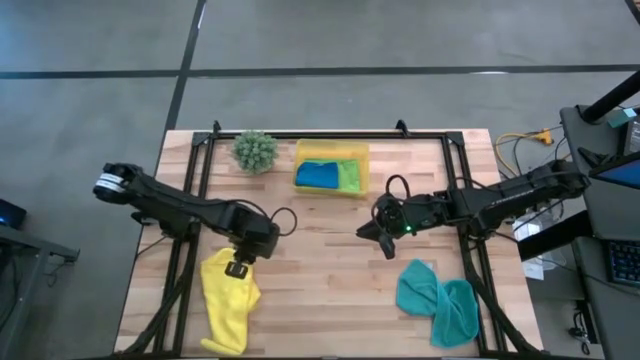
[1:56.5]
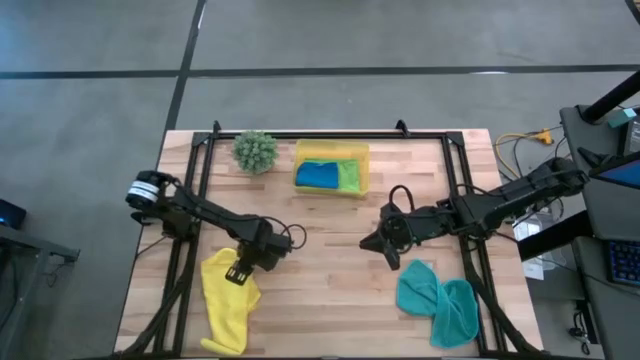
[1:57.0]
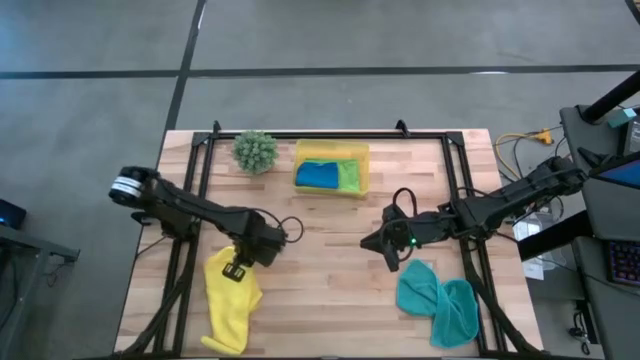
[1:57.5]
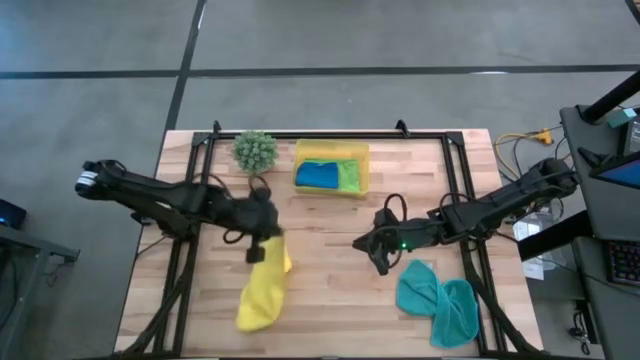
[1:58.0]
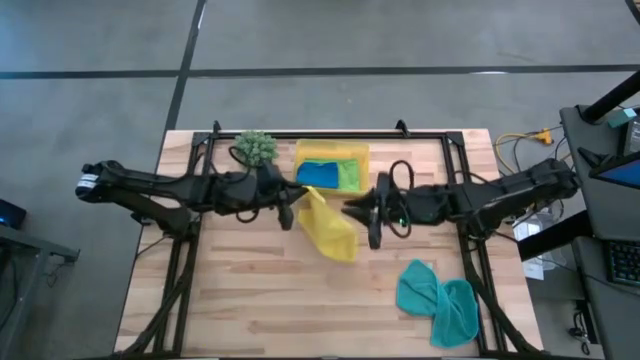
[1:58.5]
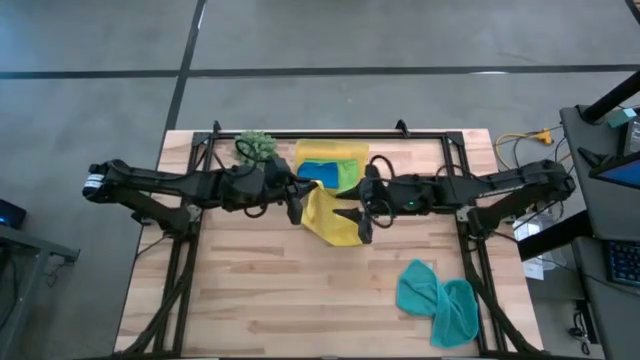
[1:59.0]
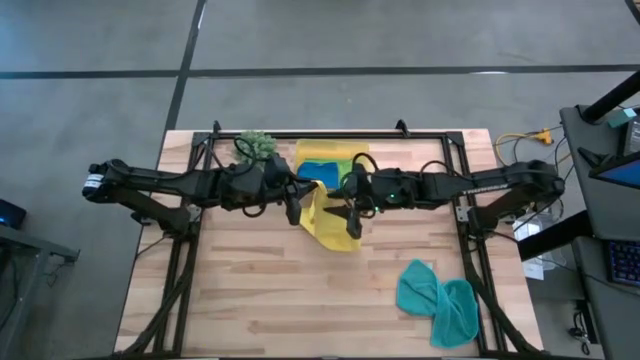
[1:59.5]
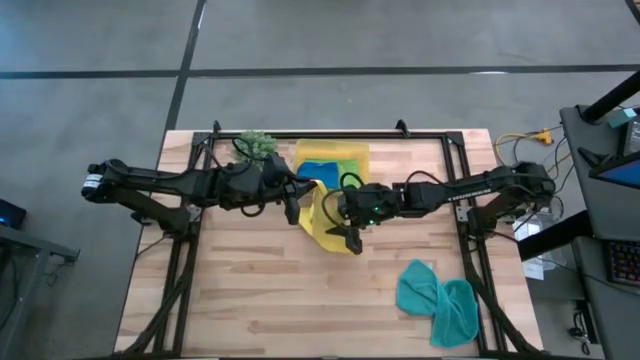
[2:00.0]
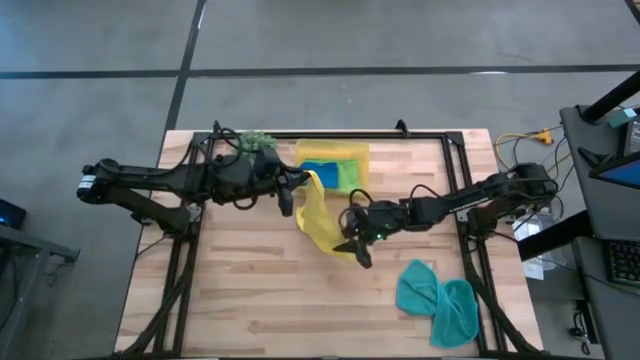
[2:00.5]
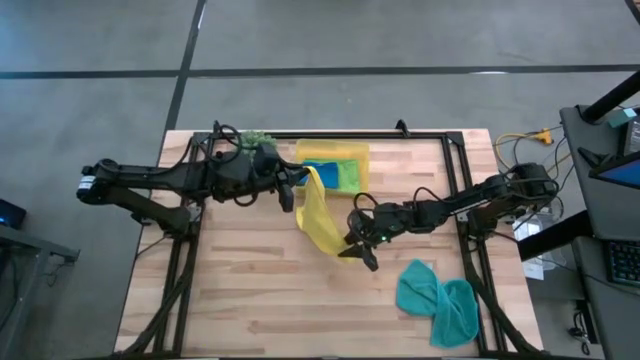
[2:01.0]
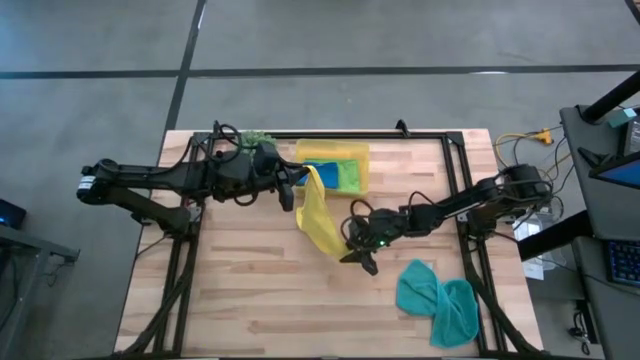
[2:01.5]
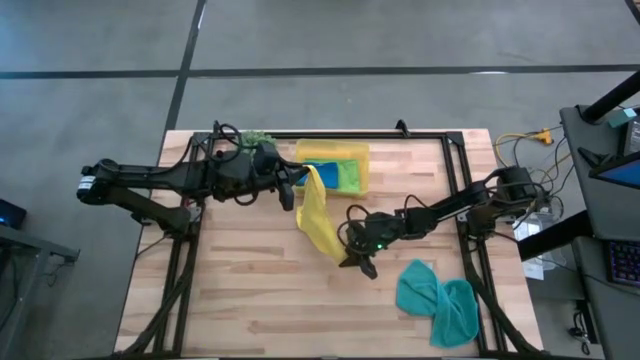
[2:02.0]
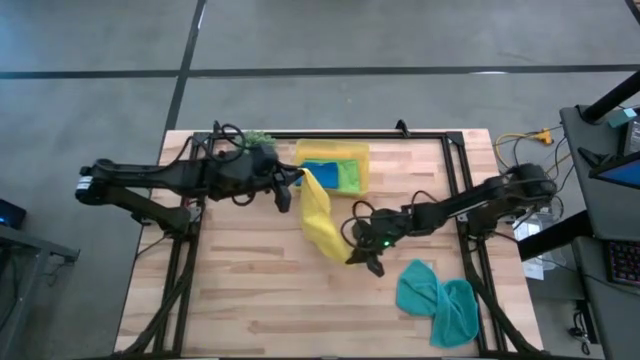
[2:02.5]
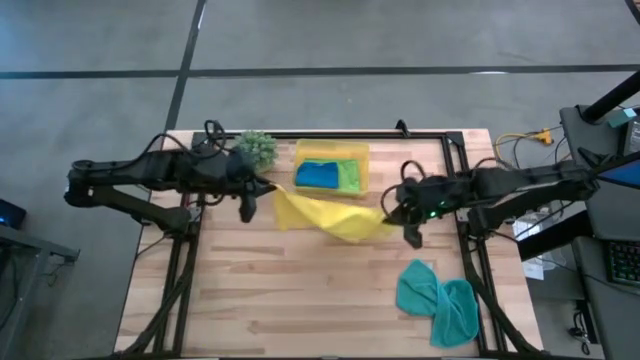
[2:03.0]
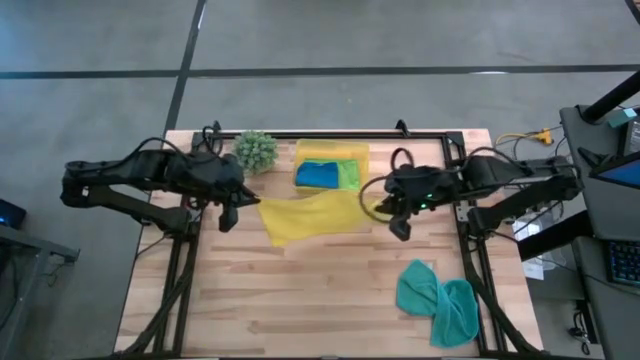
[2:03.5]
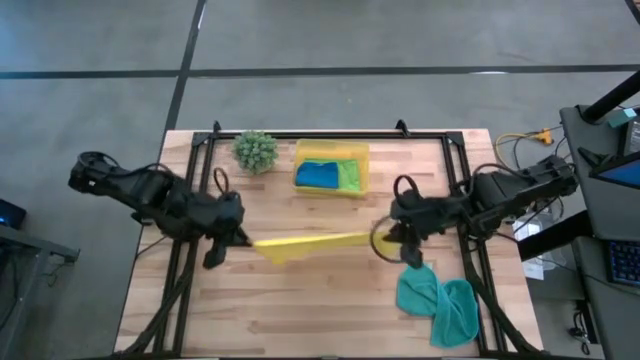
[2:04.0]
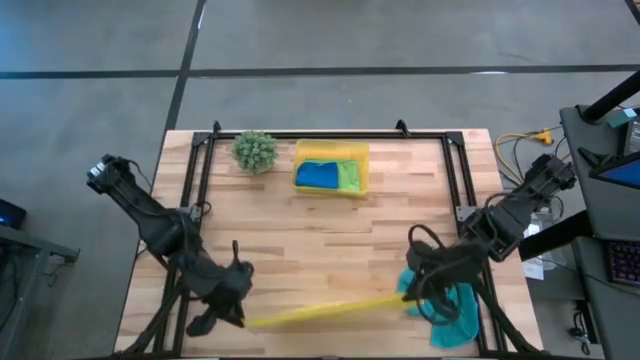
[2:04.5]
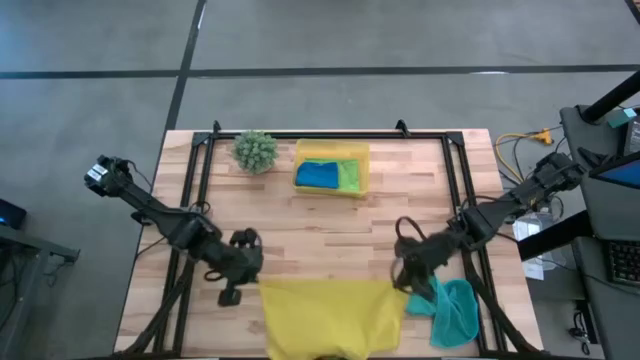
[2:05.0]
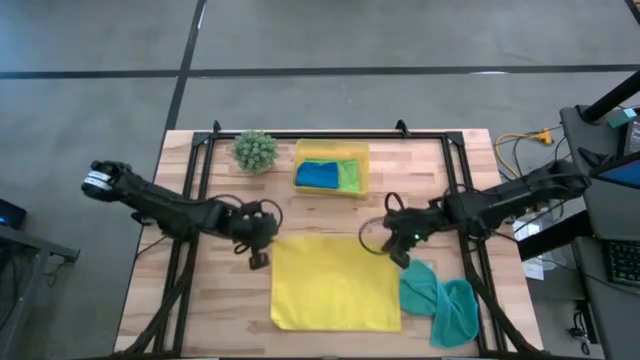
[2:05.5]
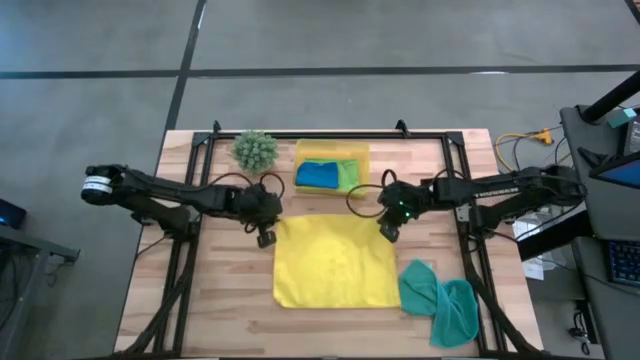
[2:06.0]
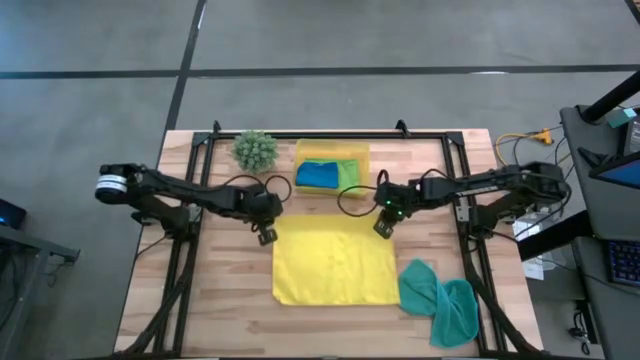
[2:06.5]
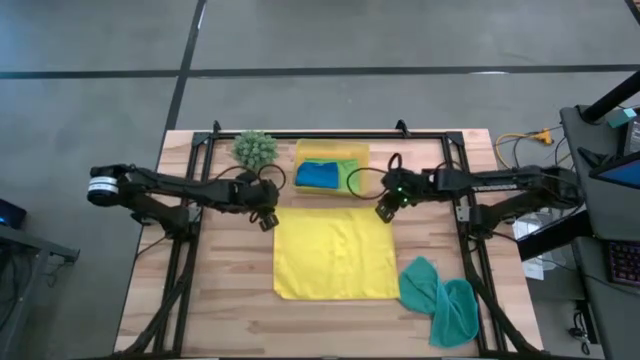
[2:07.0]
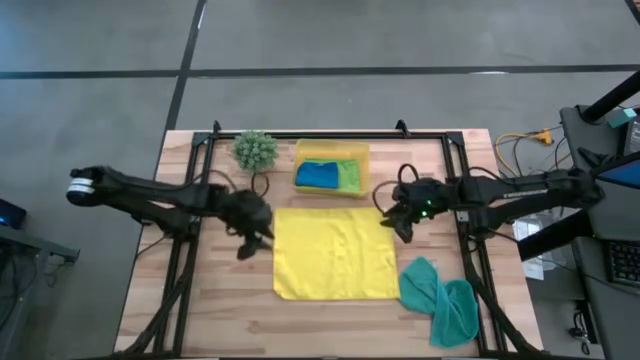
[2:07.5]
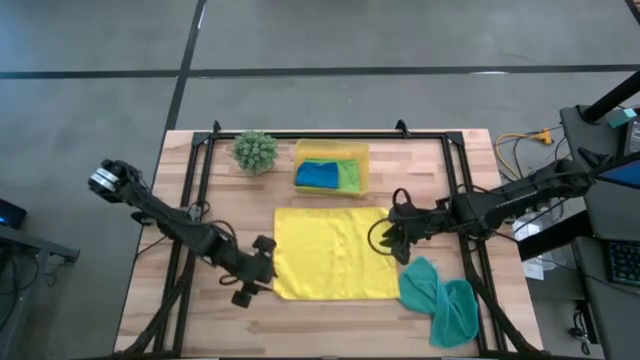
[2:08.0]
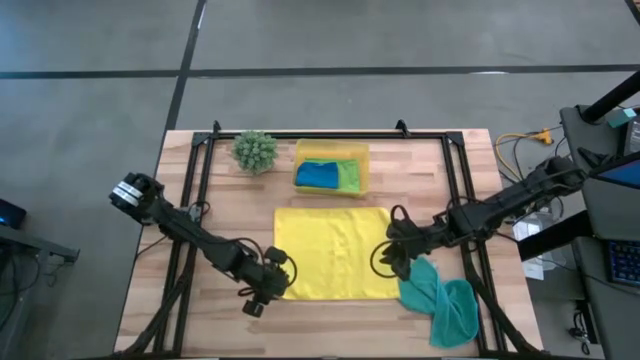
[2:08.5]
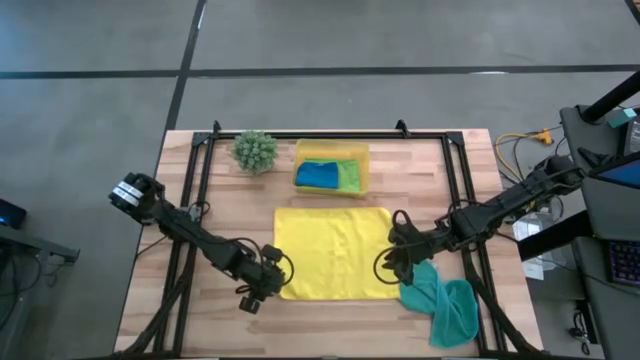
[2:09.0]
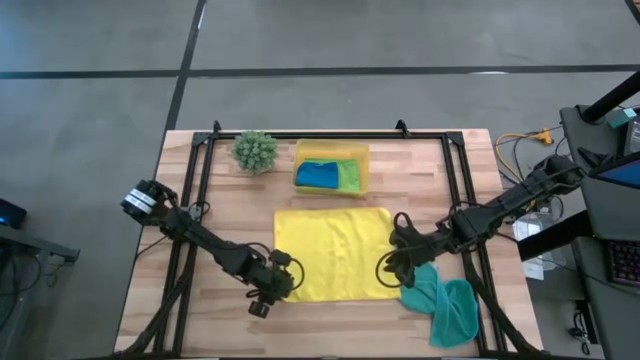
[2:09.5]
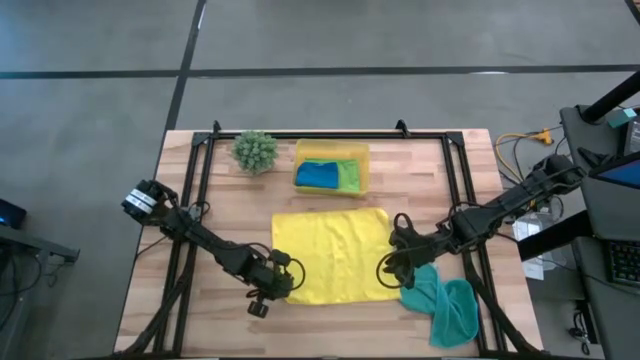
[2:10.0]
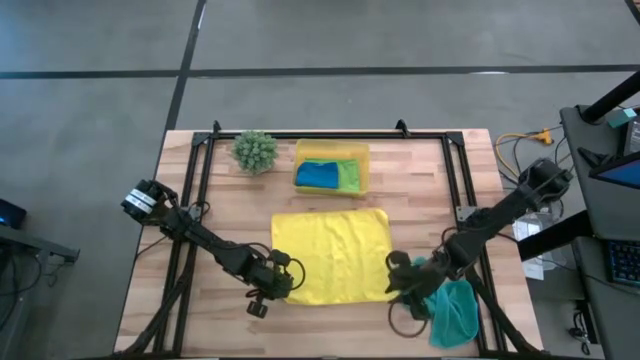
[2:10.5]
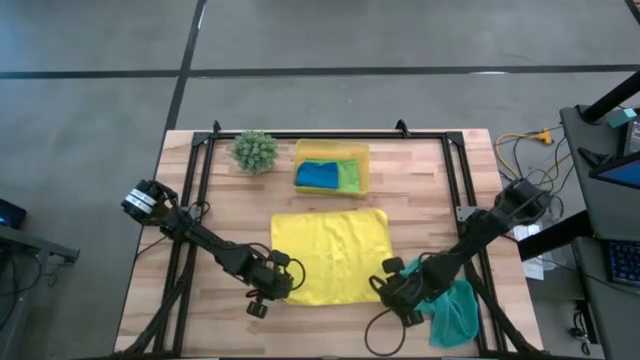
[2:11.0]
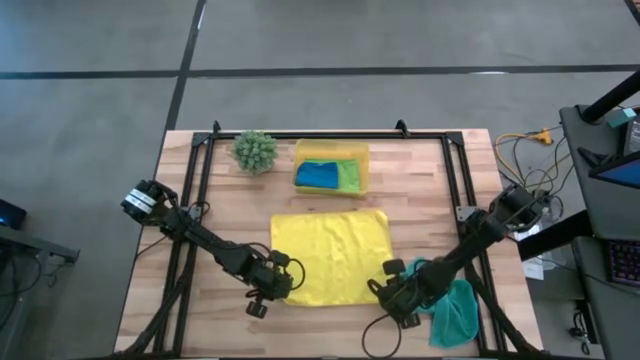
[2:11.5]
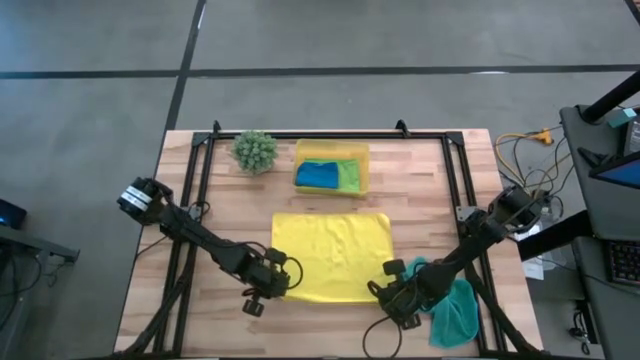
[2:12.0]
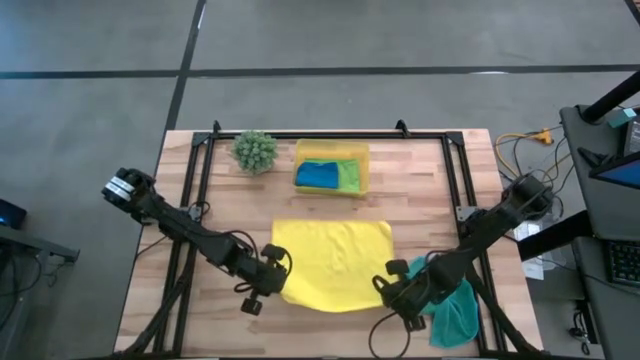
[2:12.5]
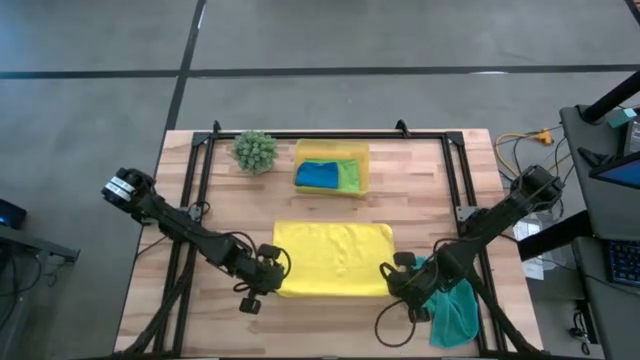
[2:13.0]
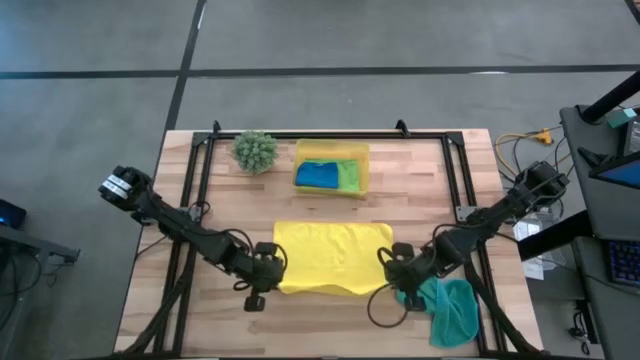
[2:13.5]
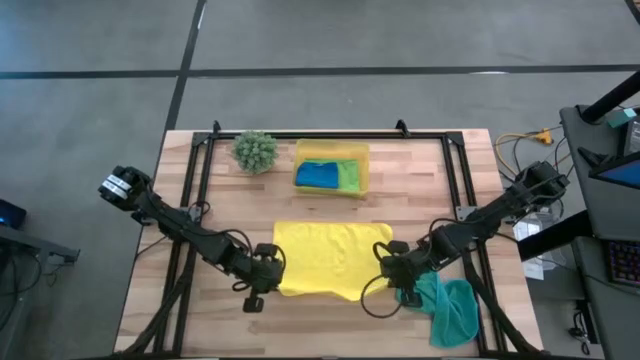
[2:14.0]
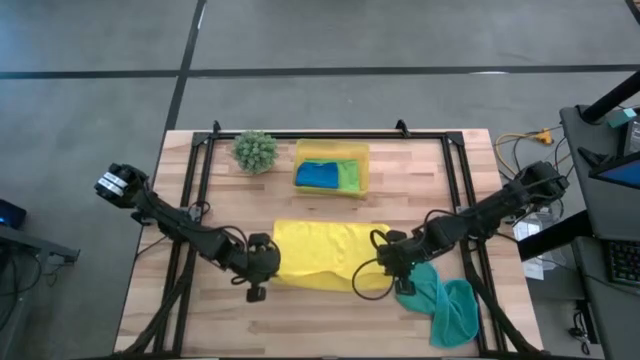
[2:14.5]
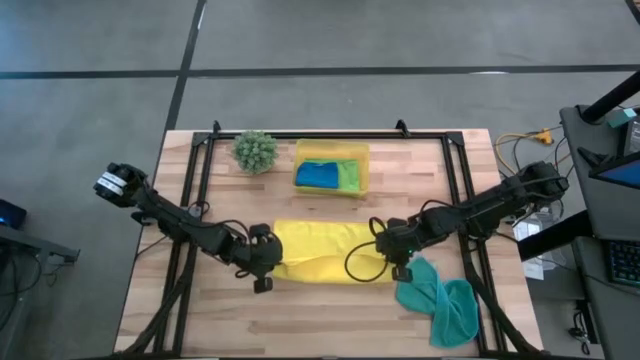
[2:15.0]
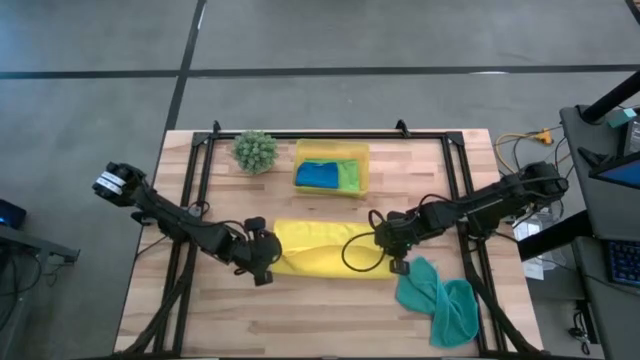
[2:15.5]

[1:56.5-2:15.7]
Task: Fold microfiber towels
Fold the yellow towel

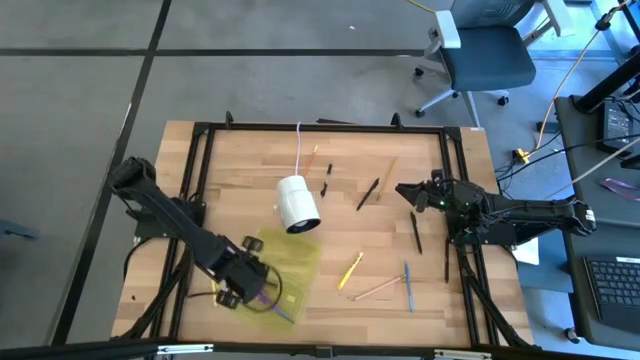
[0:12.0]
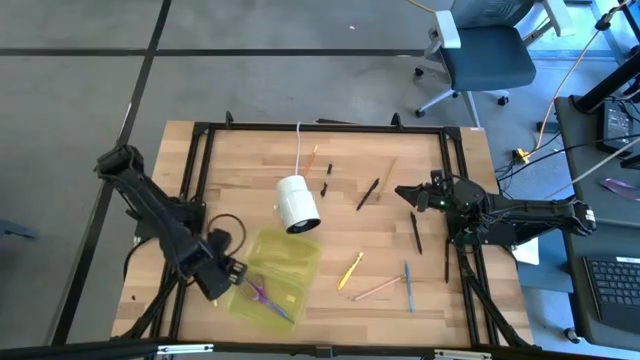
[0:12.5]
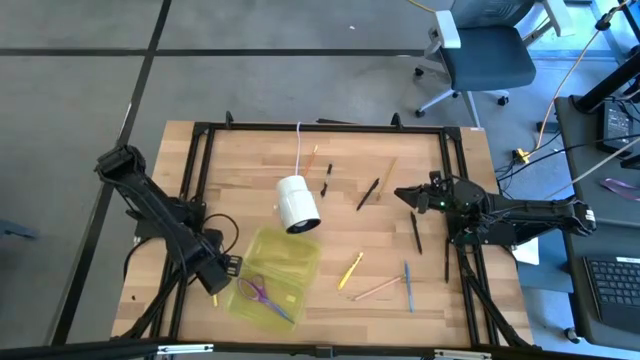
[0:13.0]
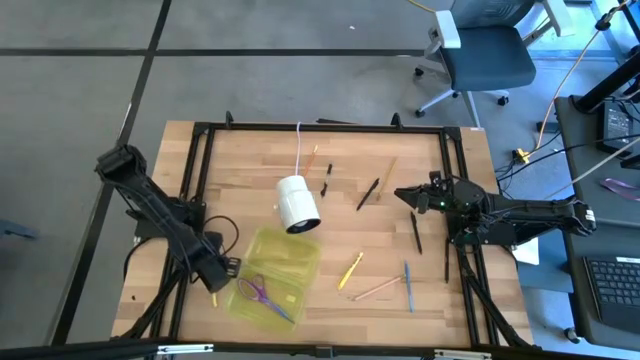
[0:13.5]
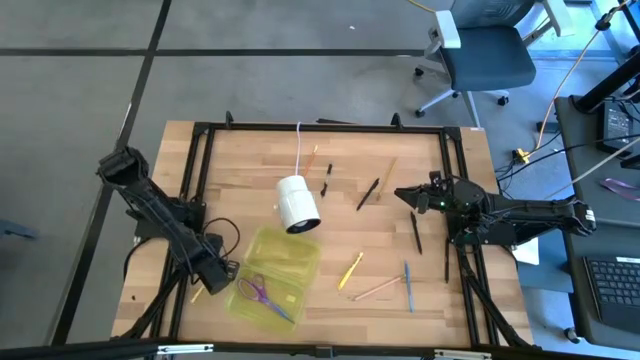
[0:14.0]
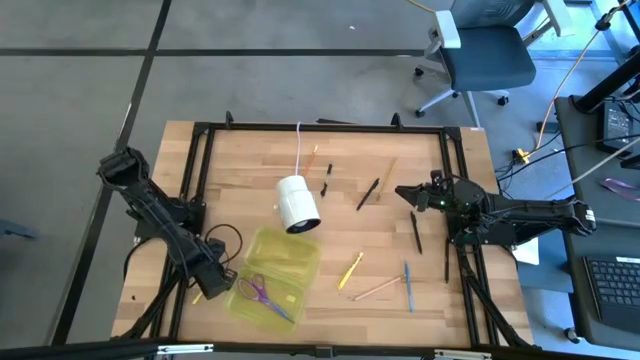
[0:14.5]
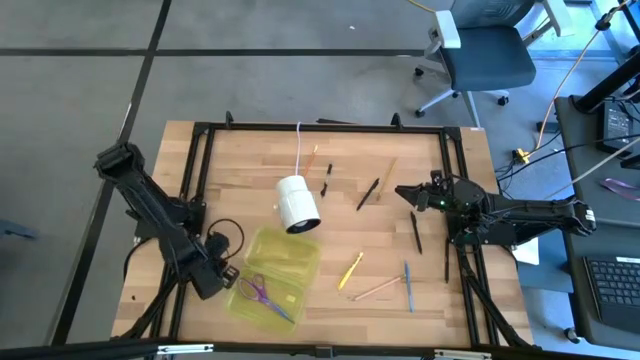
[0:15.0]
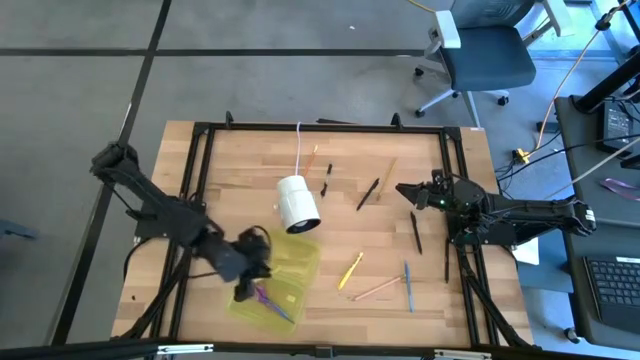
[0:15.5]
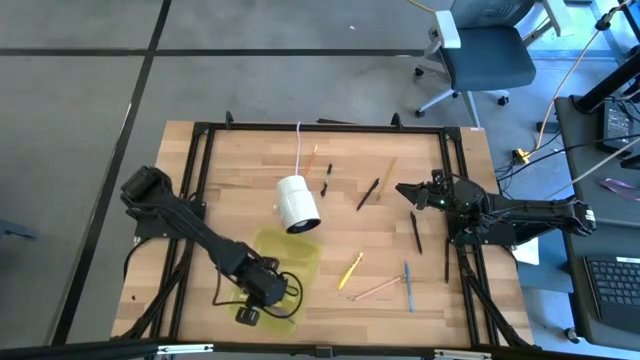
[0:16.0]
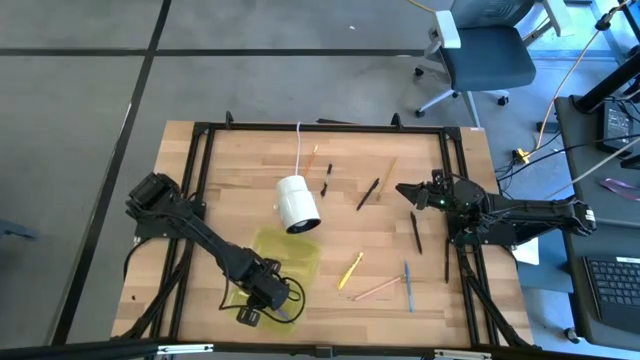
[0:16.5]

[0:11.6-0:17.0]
Task: Pick & place school supplies into a supply box
Put the yellow pen into the supply box
